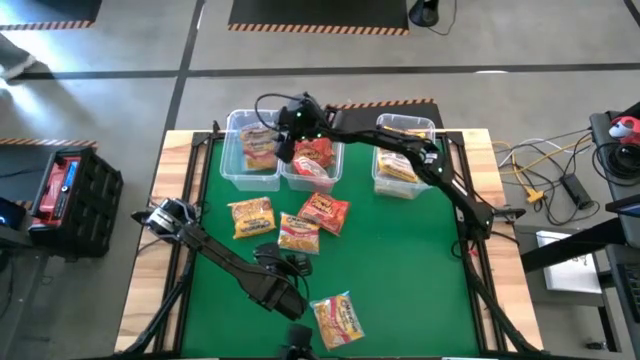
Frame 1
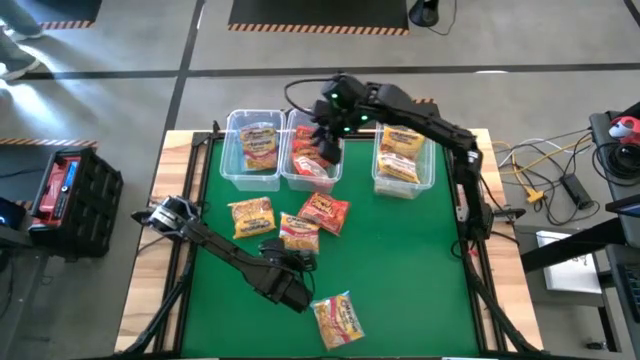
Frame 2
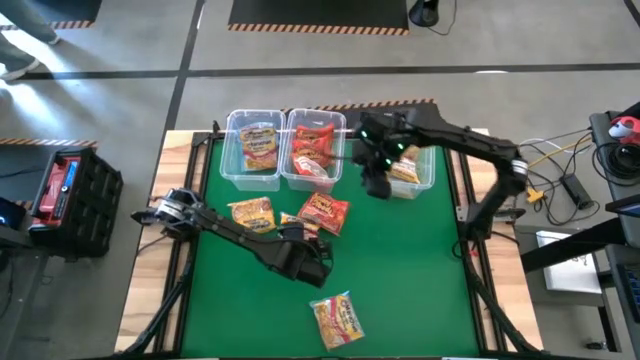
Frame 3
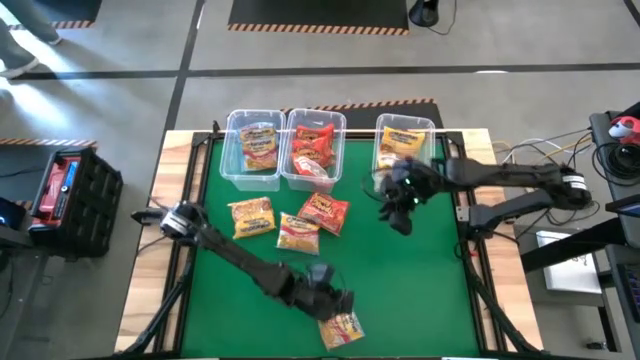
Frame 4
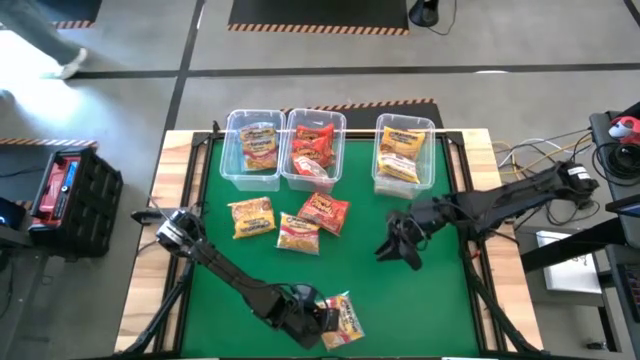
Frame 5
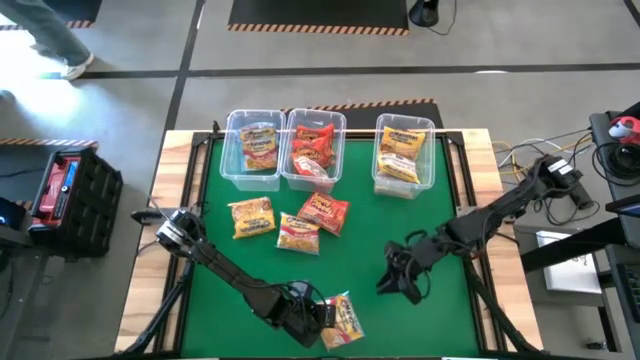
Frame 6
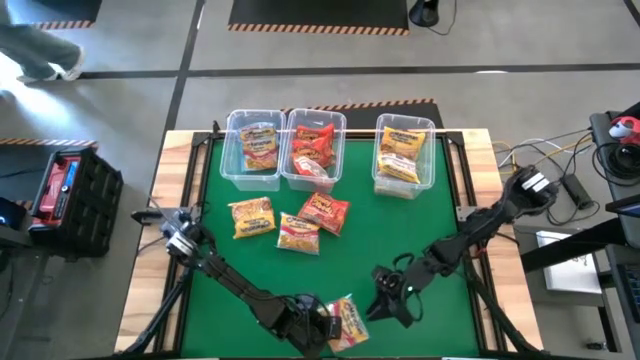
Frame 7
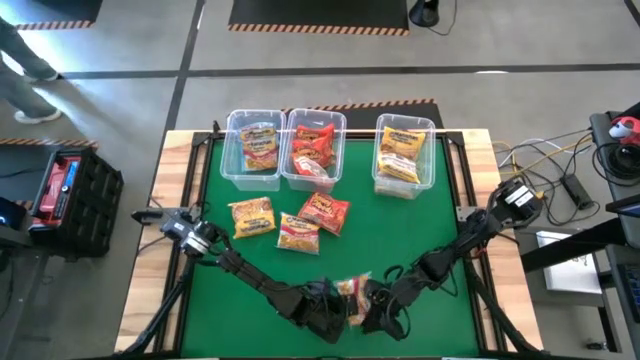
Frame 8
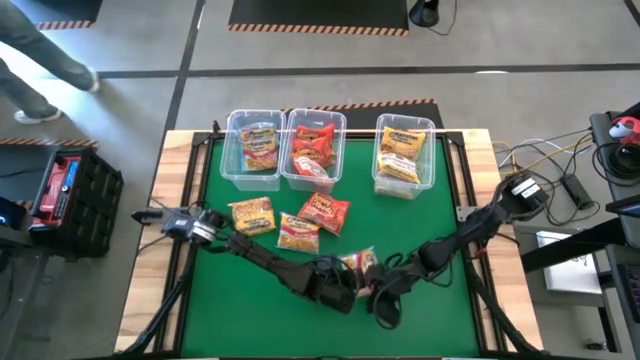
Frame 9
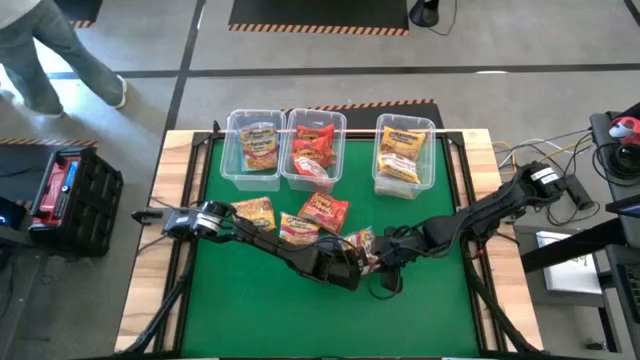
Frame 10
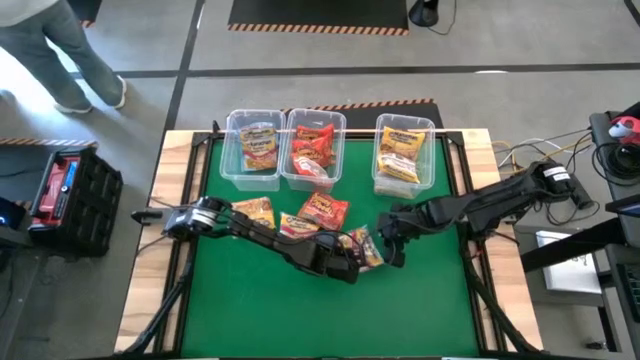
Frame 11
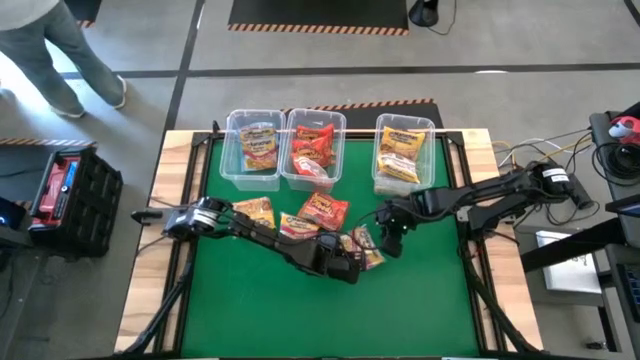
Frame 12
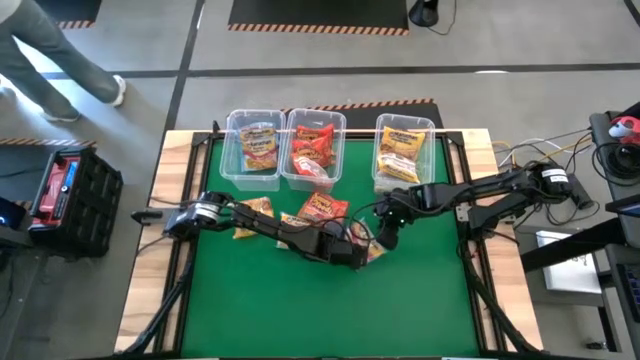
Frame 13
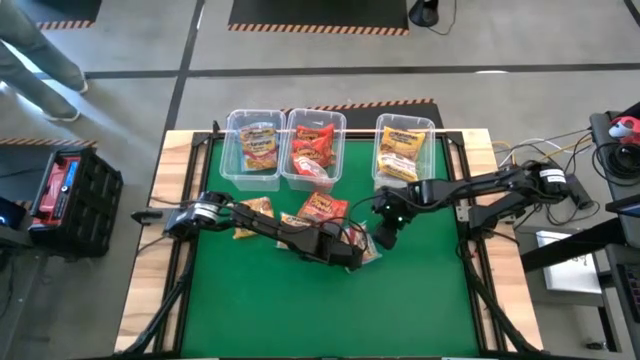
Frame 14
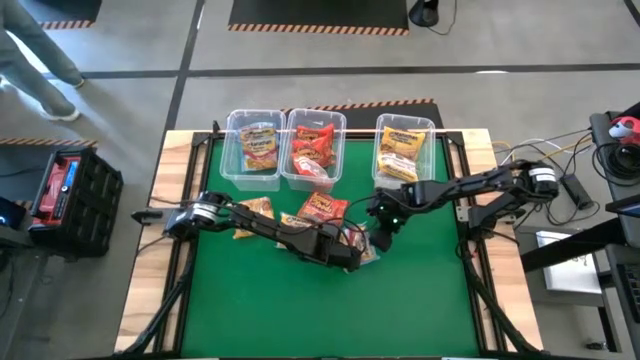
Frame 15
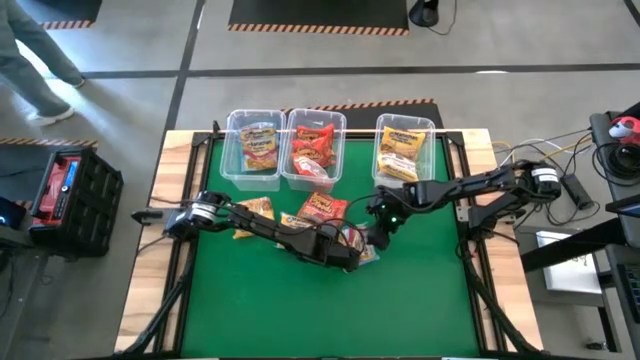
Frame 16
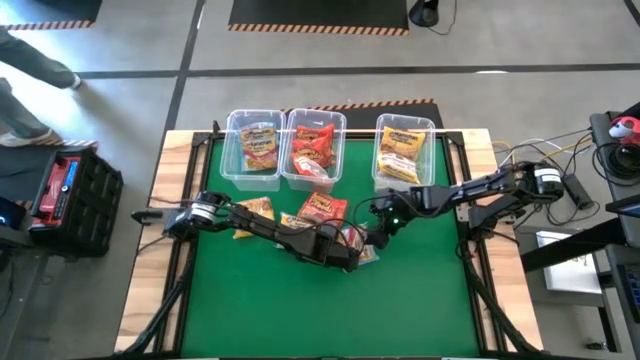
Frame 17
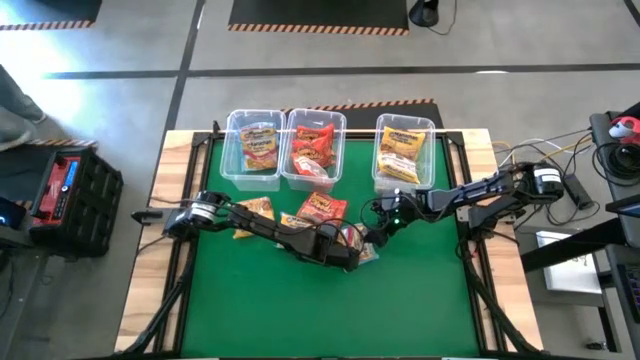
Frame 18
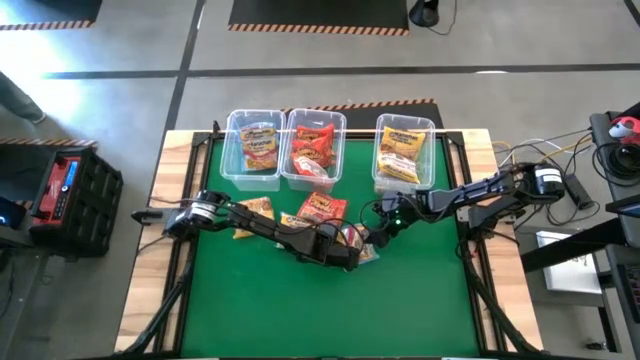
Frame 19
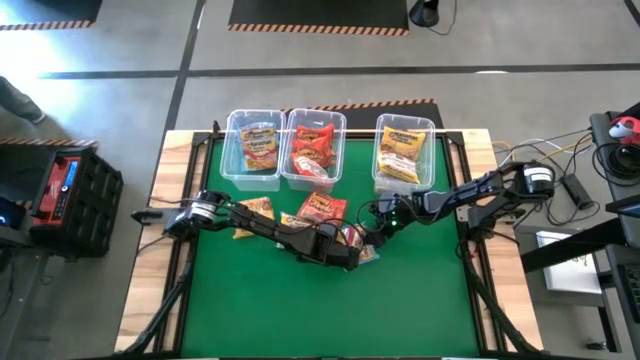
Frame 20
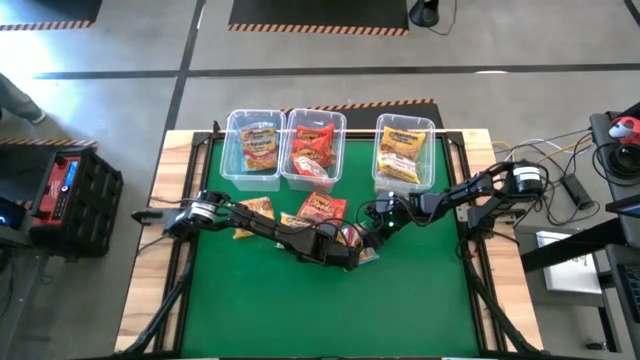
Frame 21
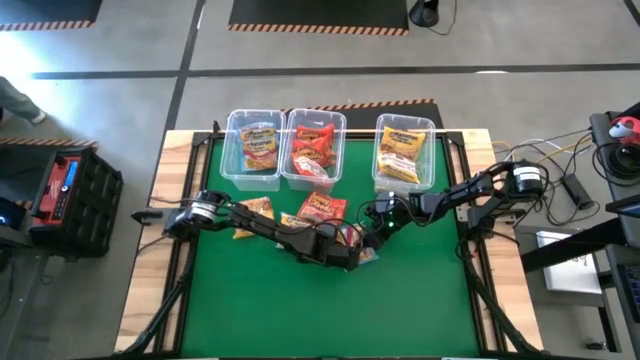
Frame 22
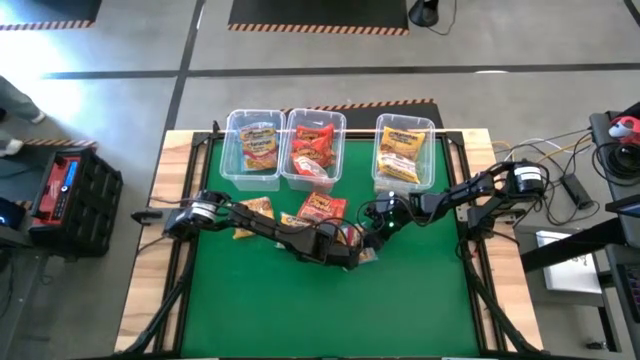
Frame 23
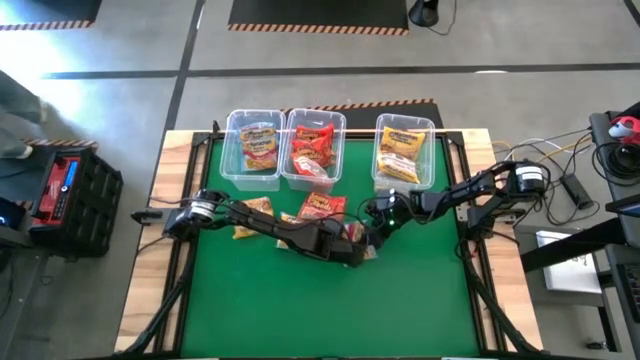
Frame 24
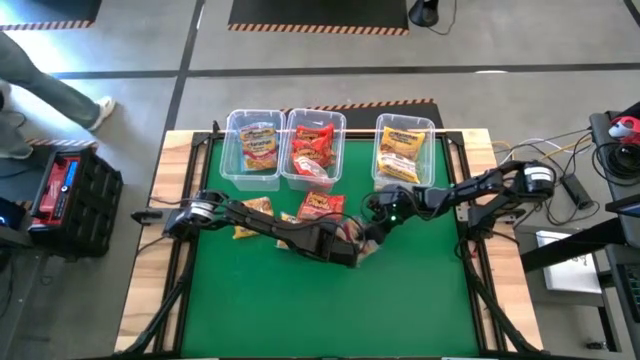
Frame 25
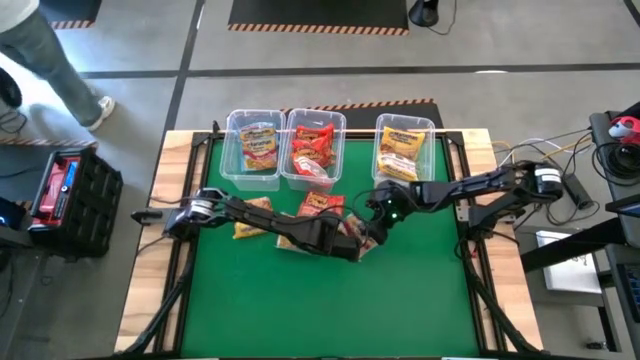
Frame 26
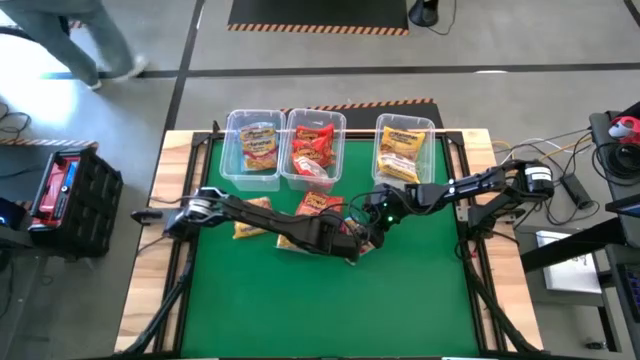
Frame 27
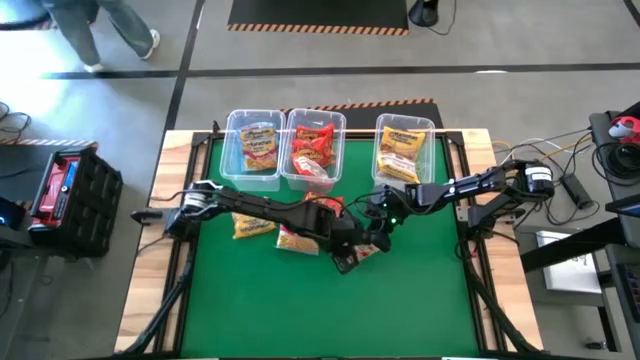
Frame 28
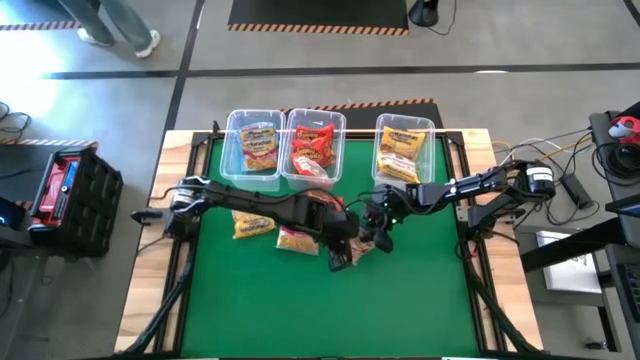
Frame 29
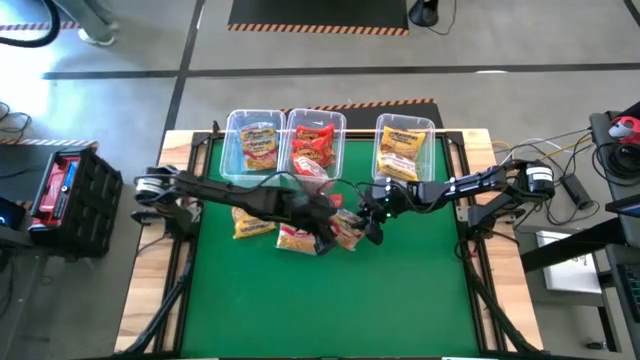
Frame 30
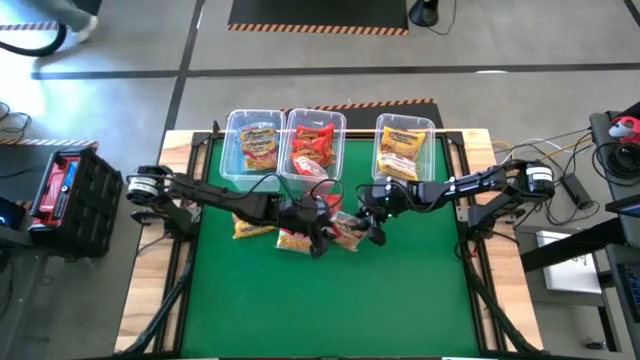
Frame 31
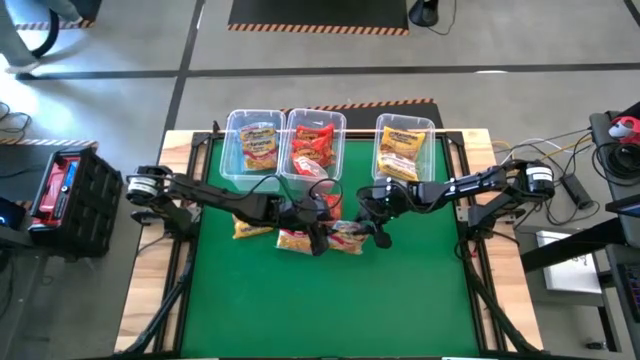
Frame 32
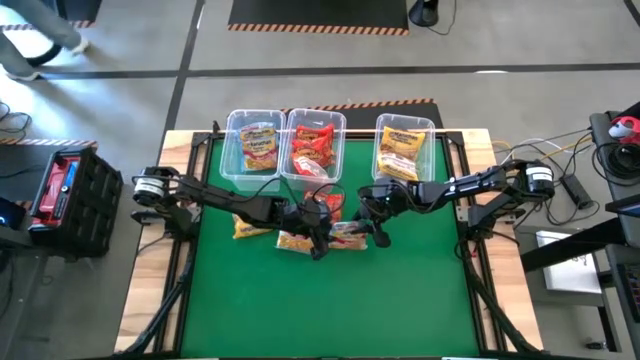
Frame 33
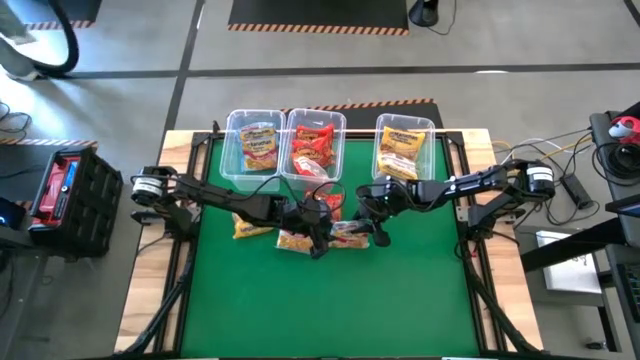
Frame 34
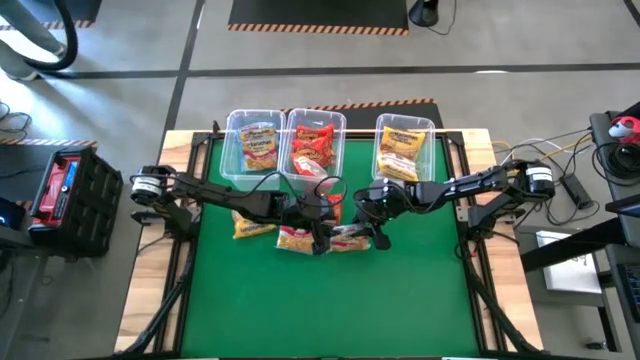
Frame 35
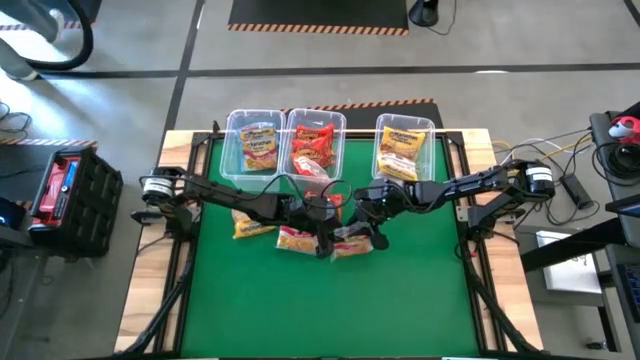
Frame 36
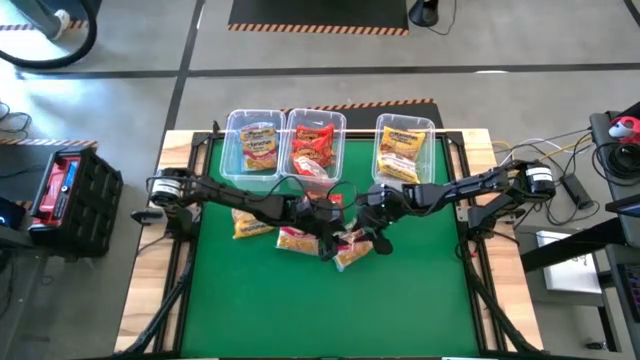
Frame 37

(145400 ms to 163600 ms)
Task: Sort Maruchan noodles
Put the bottom blue noodle pack into the top left transparent bin

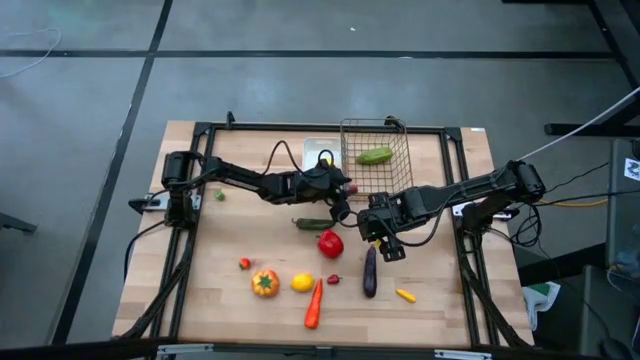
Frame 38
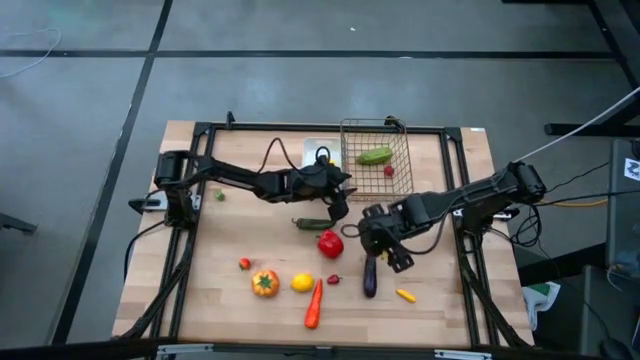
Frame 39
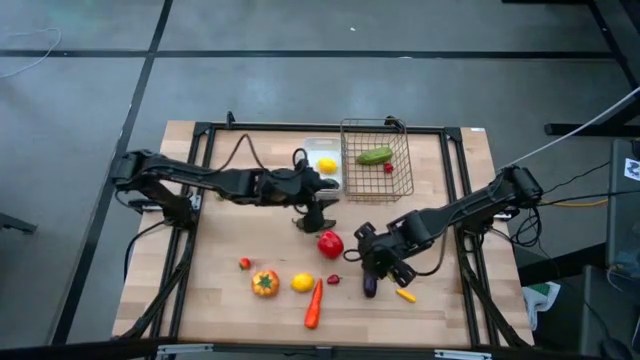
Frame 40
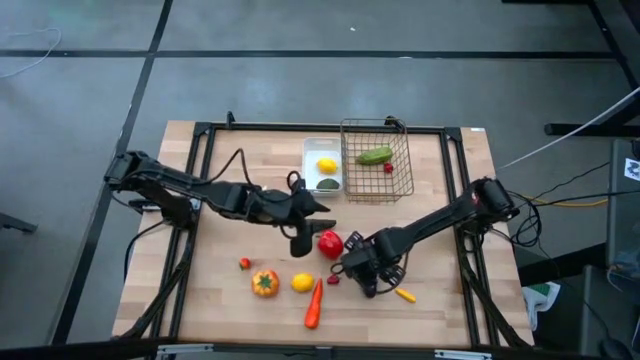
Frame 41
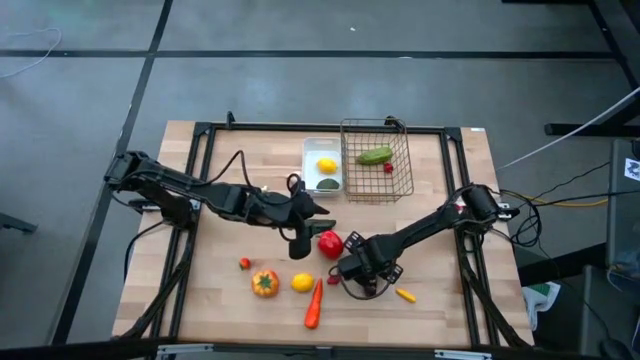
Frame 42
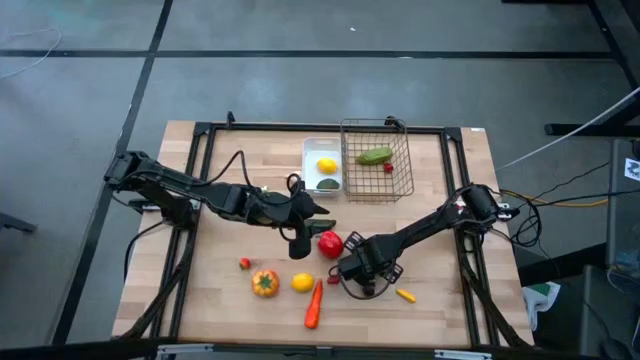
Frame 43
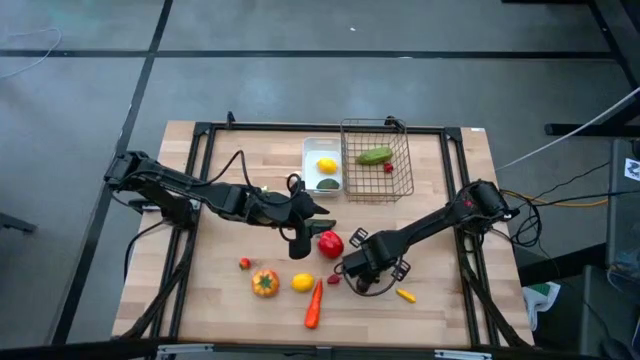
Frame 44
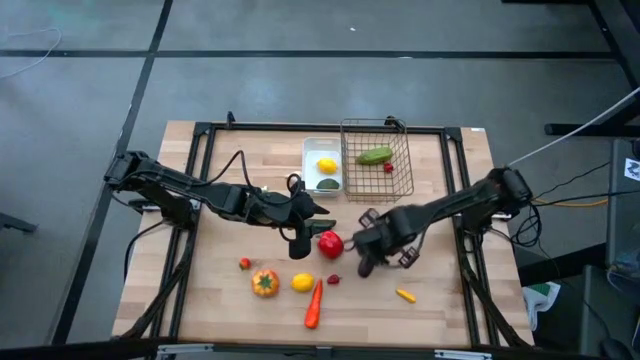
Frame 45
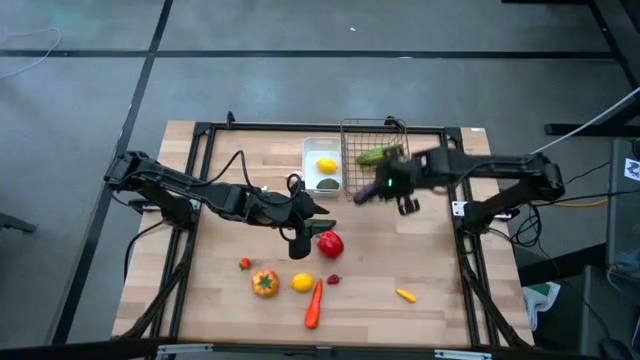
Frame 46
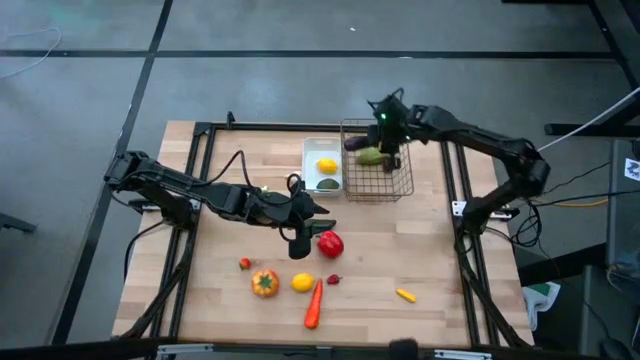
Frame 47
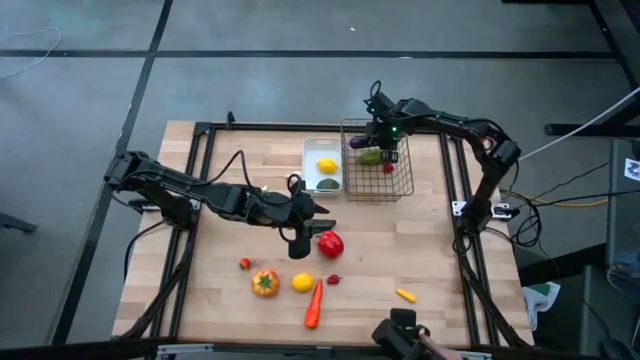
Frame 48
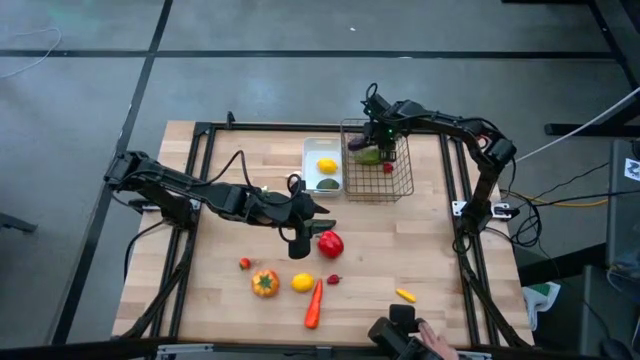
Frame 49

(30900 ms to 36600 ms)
Task: Sort produce into baskets
Put the violet eggplant into the gold wire basket
